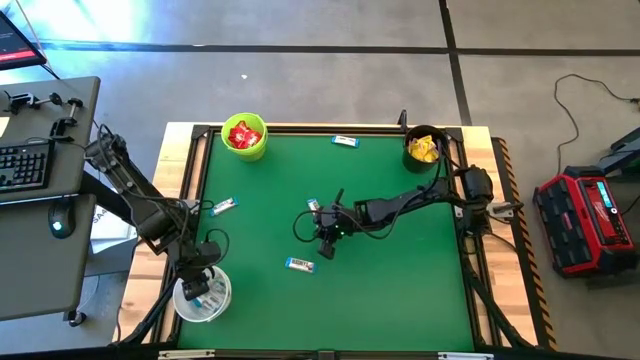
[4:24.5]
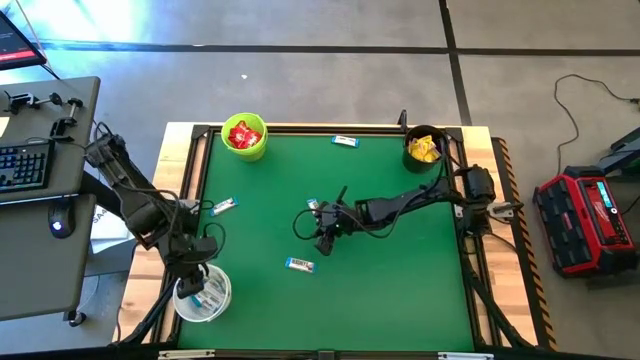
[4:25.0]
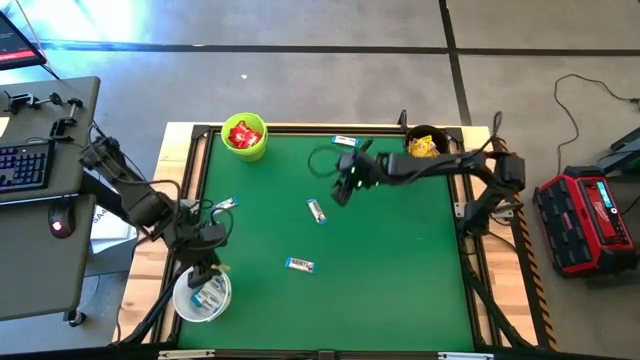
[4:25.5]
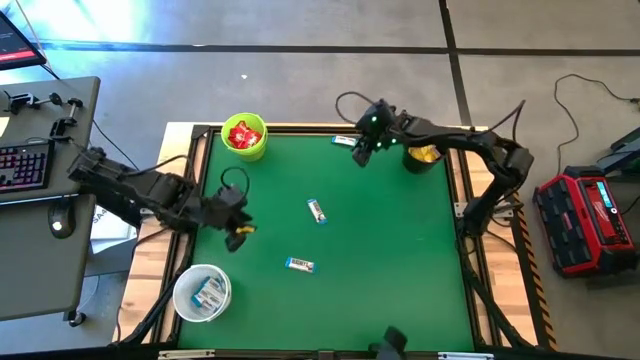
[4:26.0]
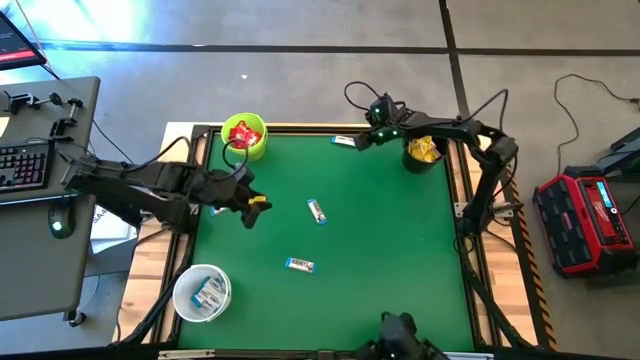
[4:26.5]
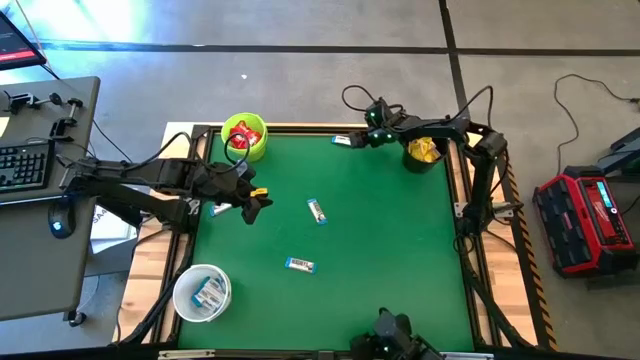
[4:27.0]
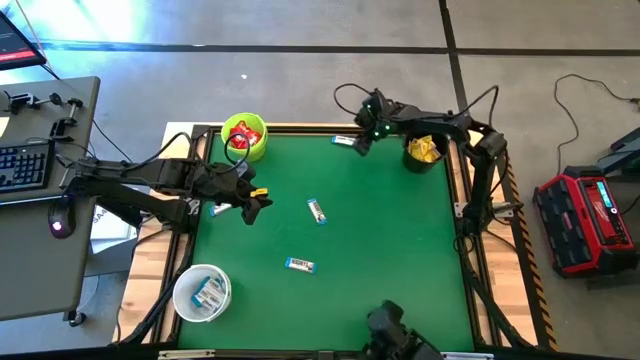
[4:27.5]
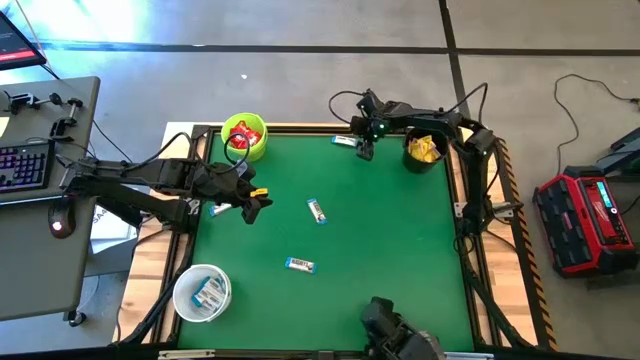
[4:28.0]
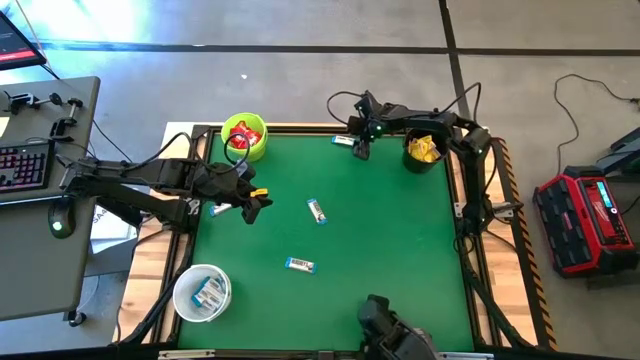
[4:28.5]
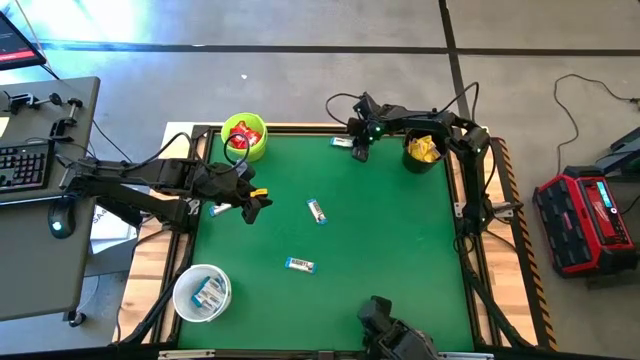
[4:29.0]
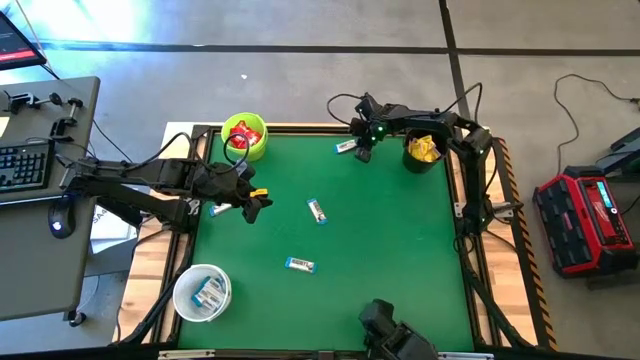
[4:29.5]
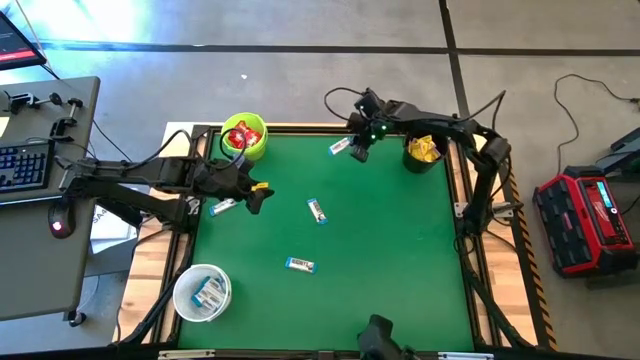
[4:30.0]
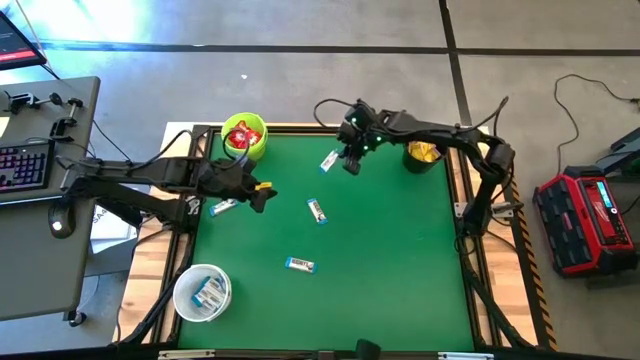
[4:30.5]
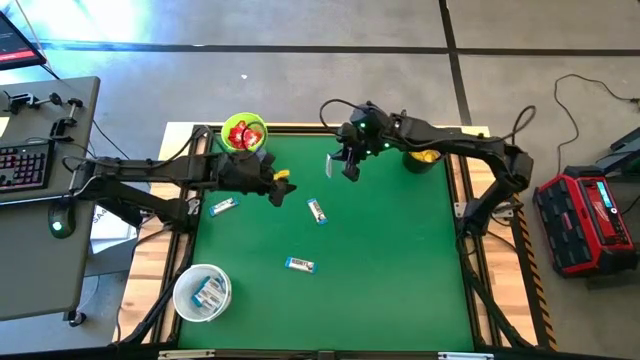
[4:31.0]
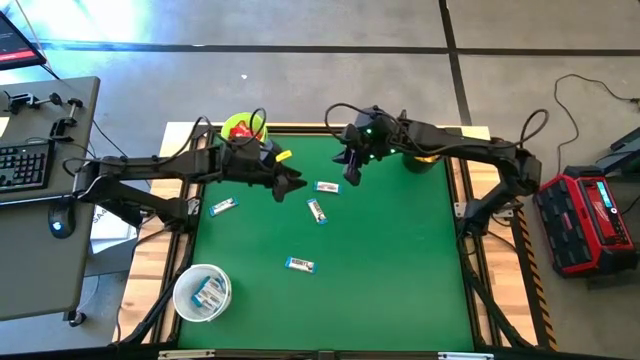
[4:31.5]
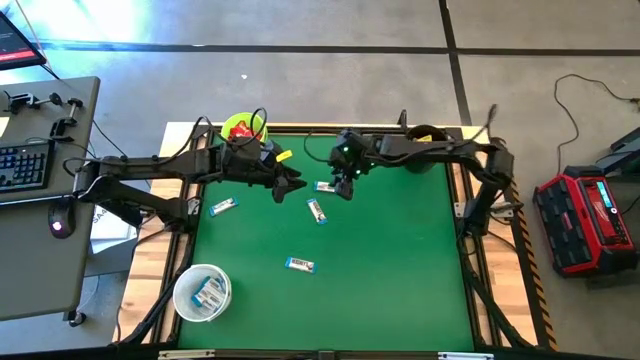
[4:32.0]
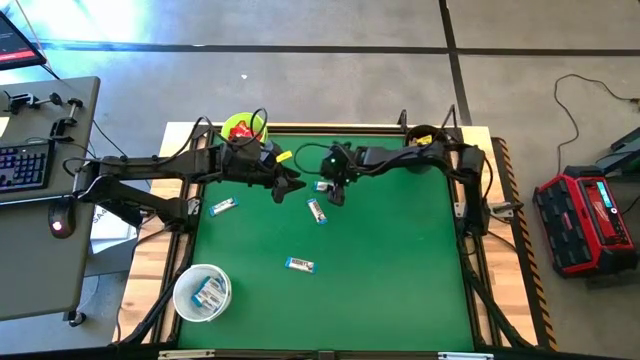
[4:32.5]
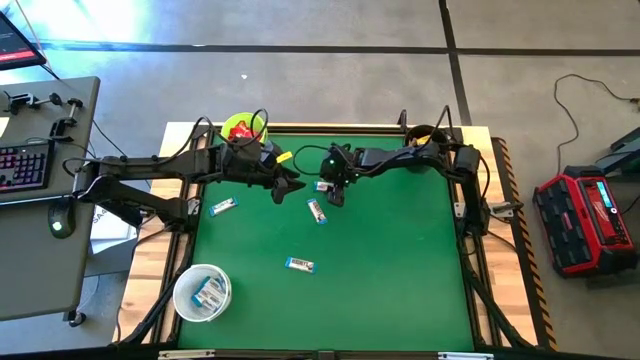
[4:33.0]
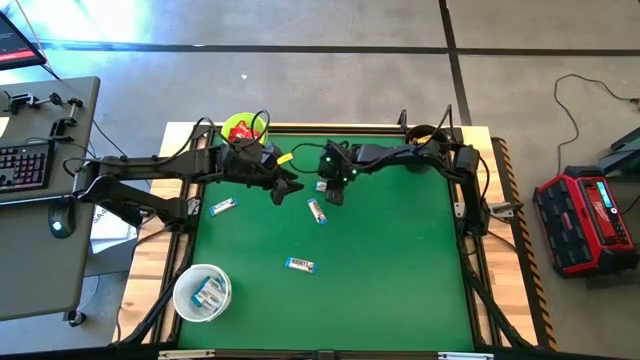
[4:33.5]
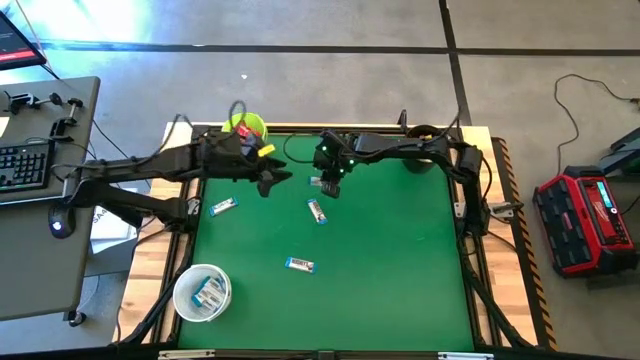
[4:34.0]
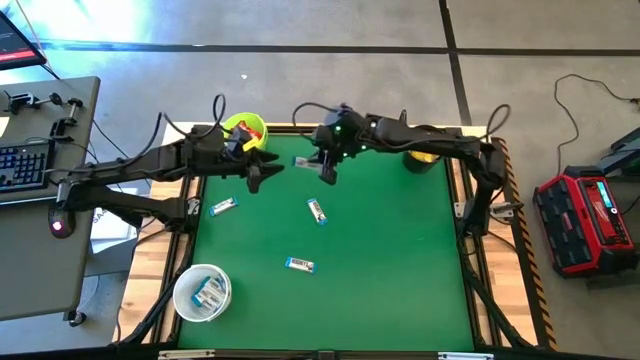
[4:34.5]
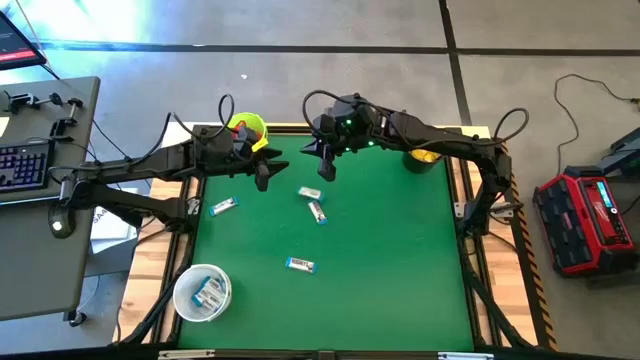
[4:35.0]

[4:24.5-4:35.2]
Task: Sort candy by brand, put in halloween buckets
Put the white chocolate into the white bucket

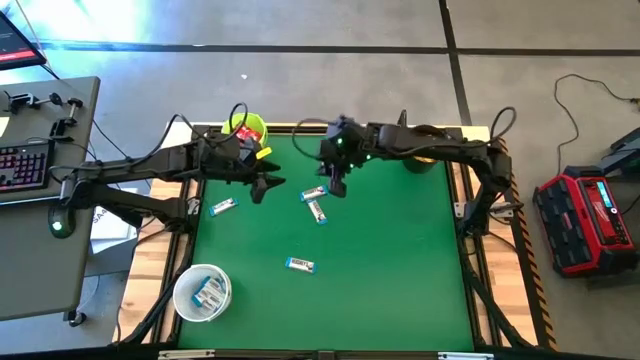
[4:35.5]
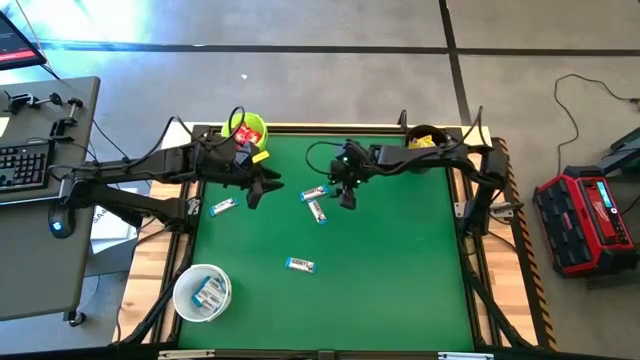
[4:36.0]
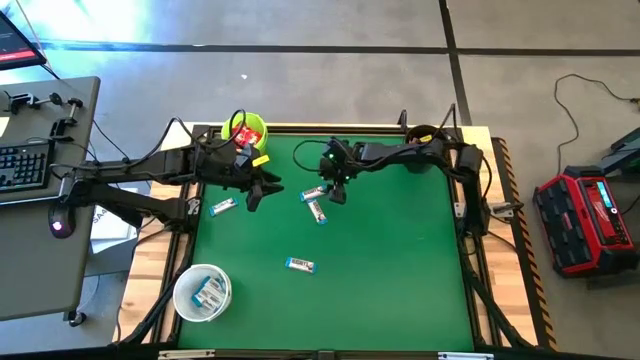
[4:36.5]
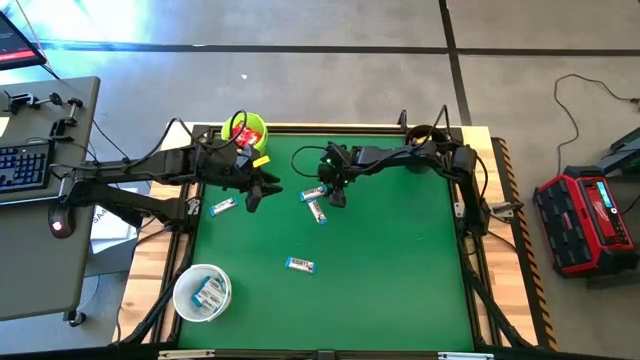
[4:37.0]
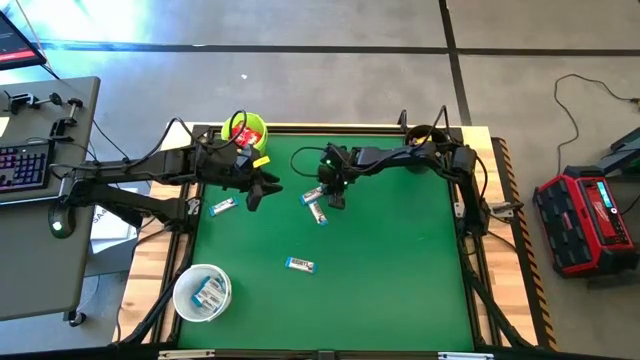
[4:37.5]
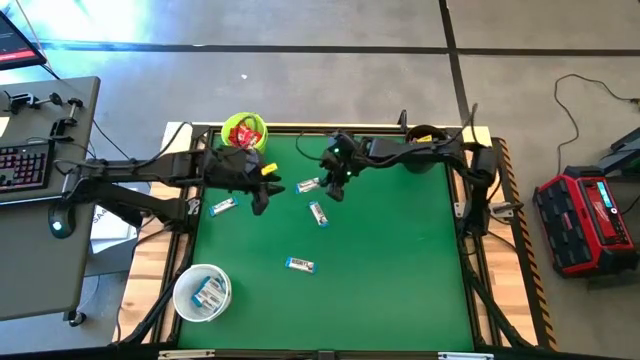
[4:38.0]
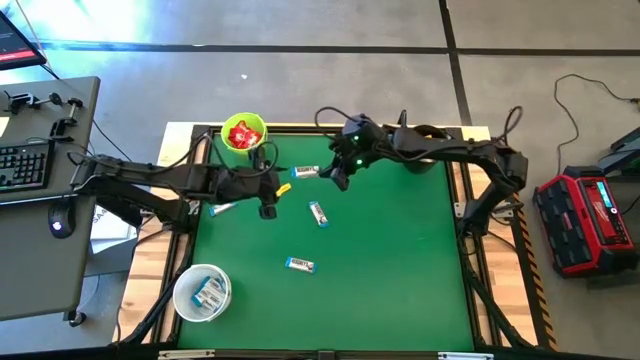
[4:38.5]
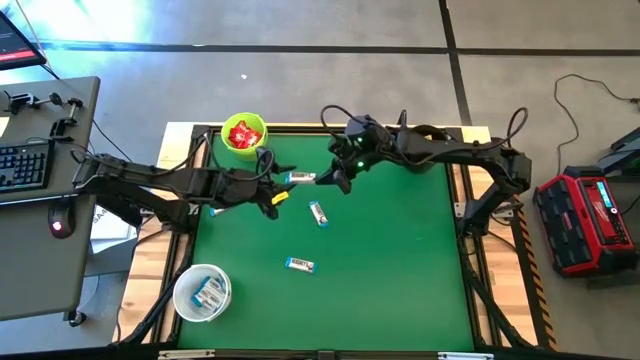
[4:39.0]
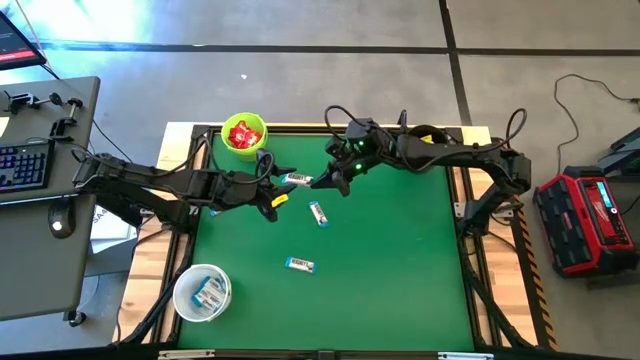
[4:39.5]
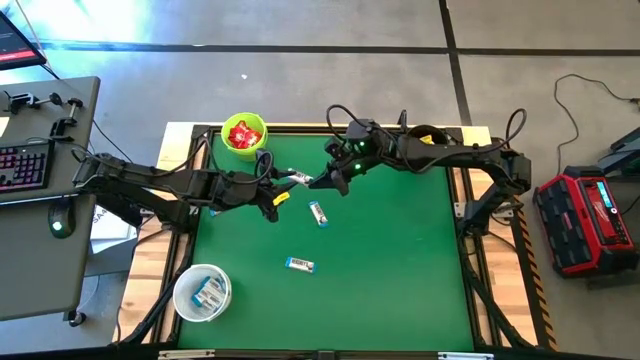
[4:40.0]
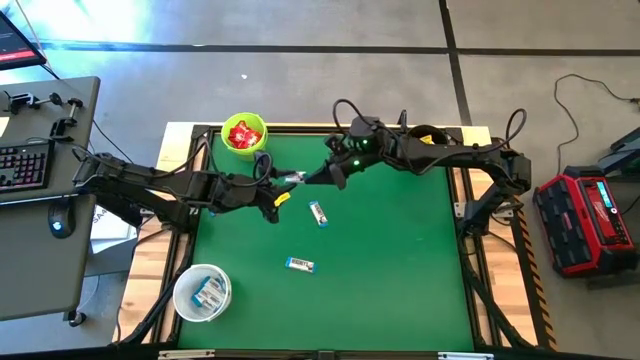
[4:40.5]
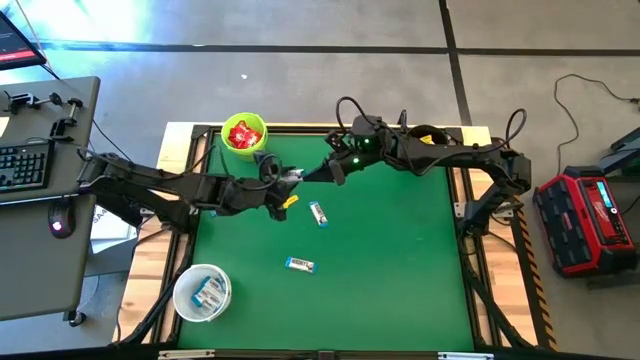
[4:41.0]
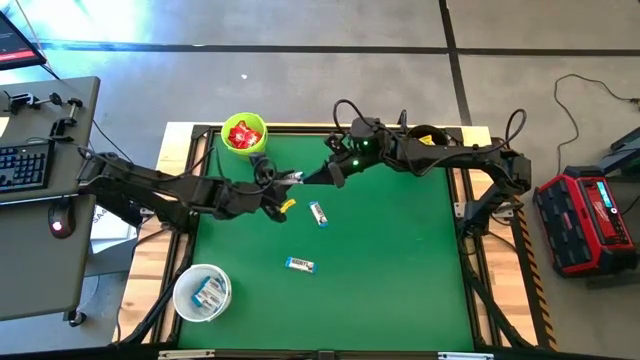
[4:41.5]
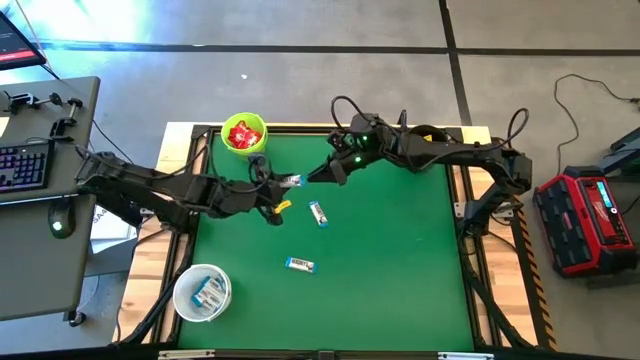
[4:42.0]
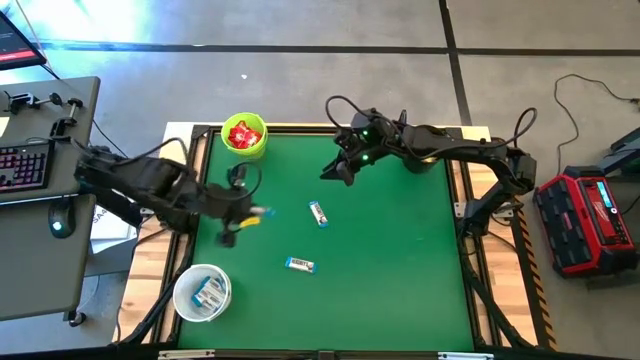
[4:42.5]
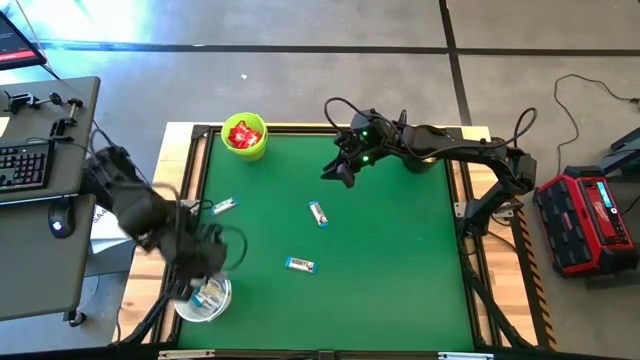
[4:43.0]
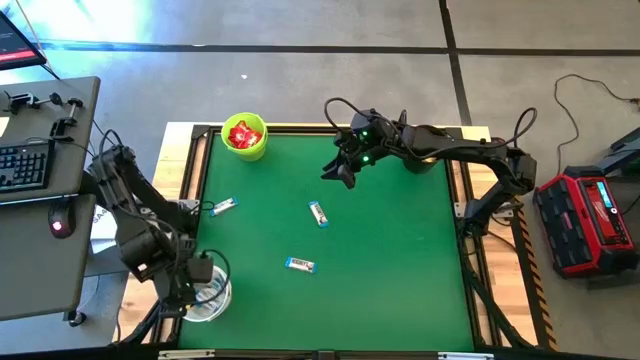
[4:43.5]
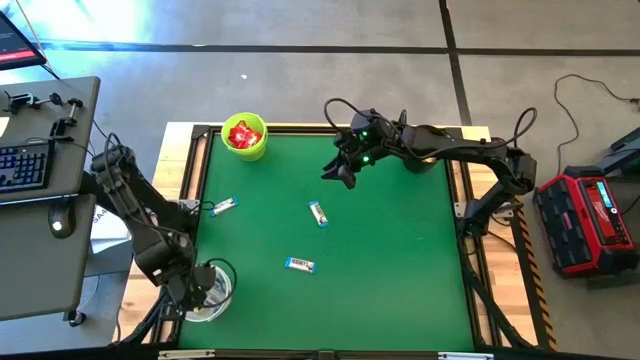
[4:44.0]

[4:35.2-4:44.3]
Put the white chocolate into the white bucket

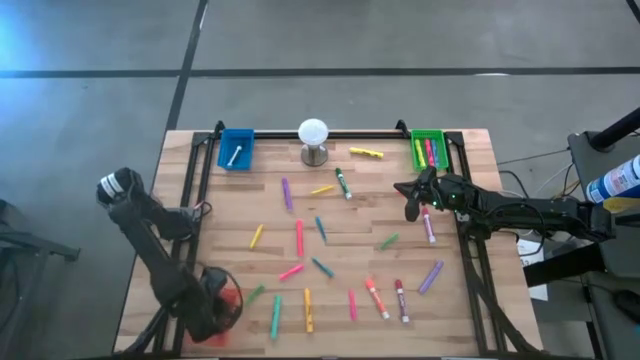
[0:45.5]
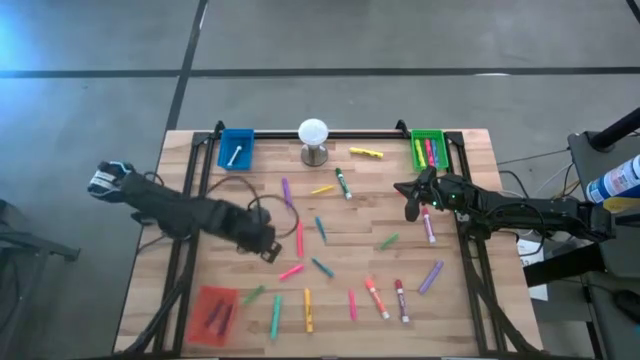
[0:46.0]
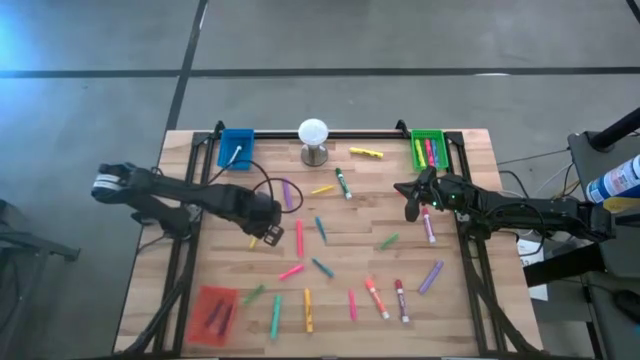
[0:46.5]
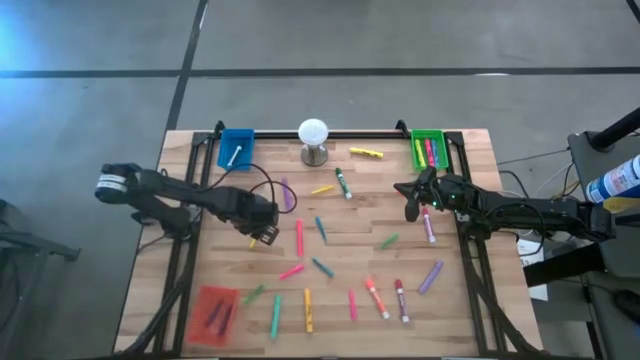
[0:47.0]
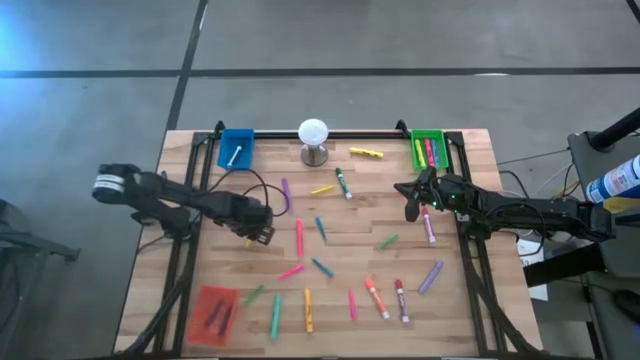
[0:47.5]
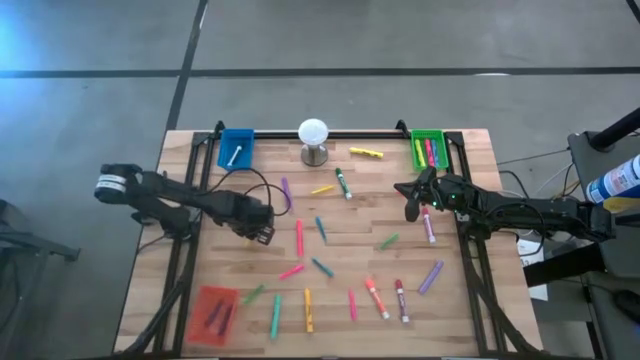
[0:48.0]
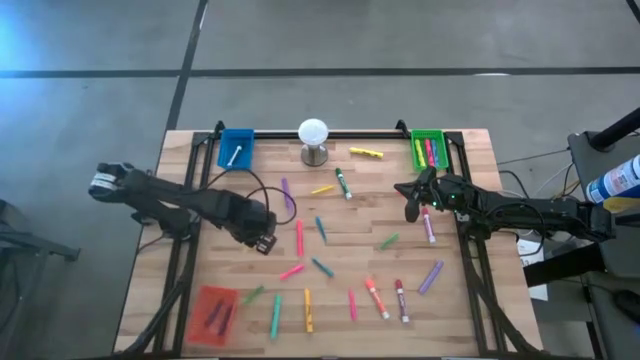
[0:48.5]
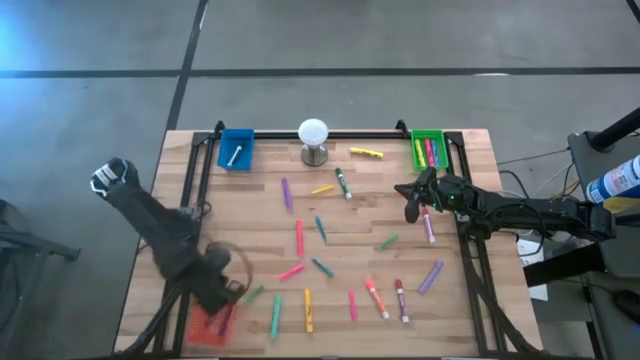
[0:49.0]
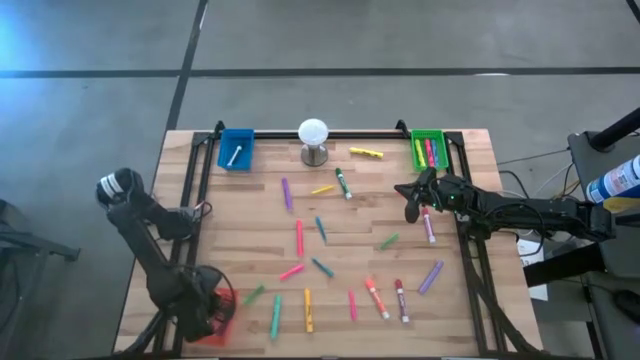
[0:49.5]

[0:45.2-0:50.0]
Task: Pick & Place Markers
Put the bottom yellow pen into the orange bin
